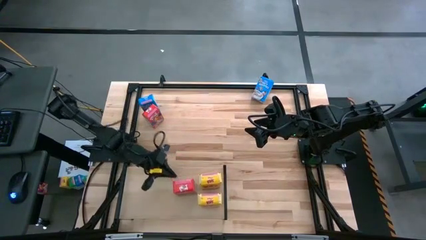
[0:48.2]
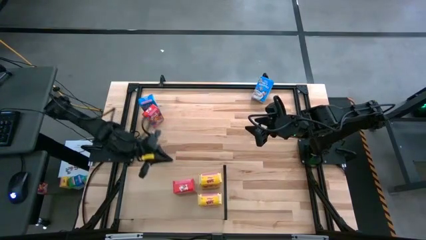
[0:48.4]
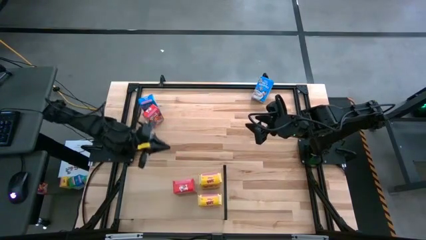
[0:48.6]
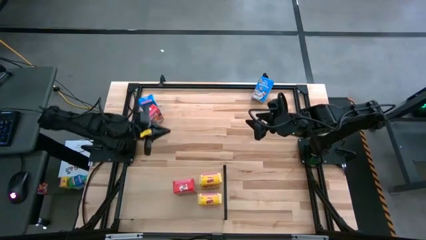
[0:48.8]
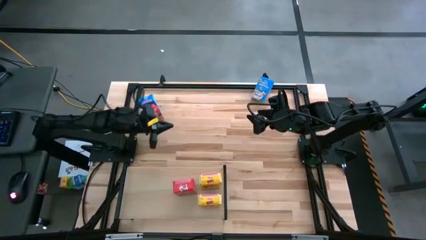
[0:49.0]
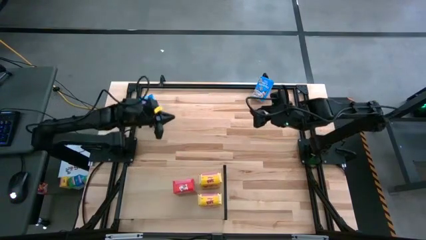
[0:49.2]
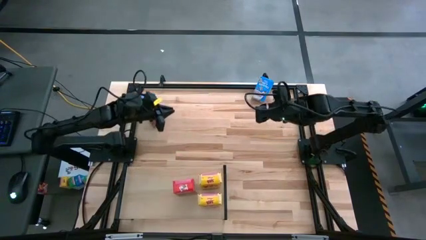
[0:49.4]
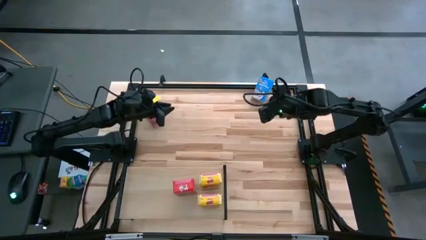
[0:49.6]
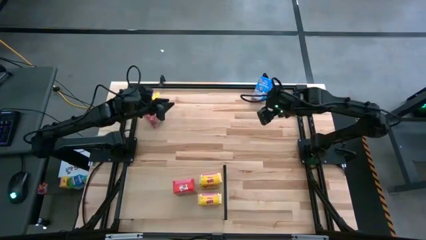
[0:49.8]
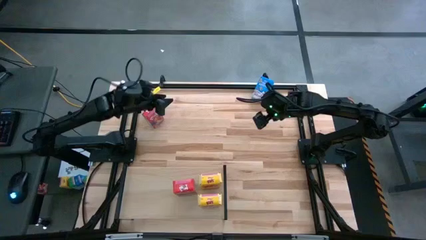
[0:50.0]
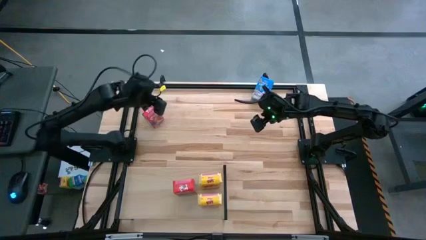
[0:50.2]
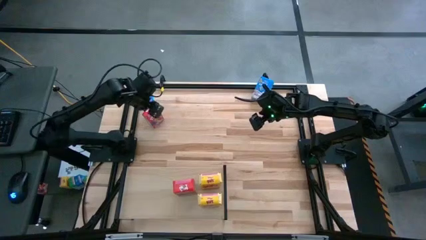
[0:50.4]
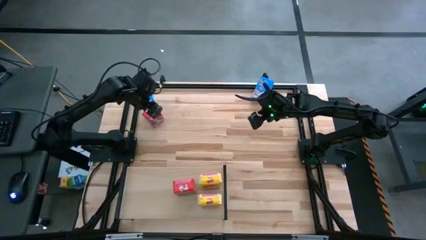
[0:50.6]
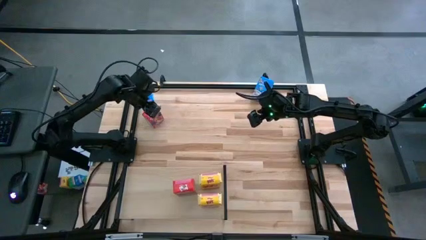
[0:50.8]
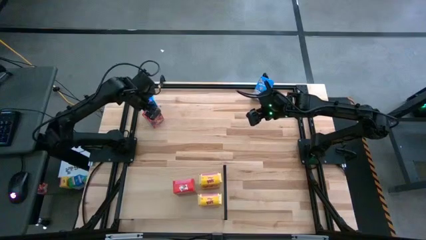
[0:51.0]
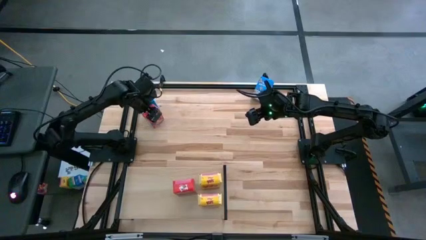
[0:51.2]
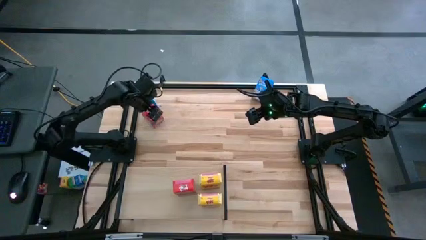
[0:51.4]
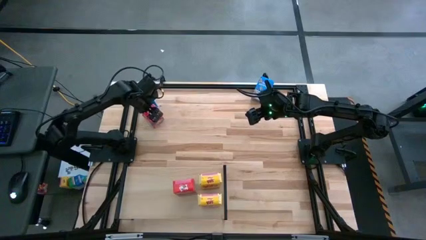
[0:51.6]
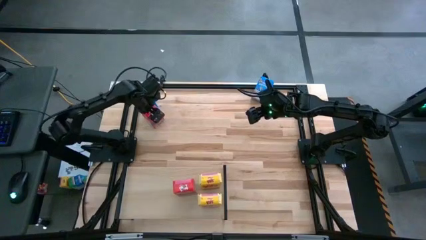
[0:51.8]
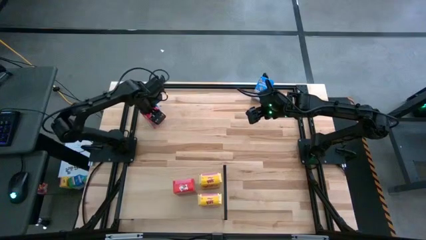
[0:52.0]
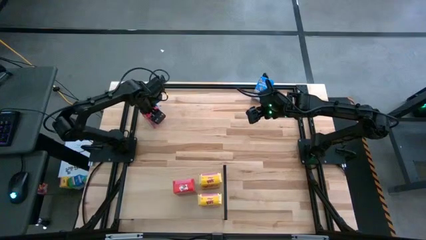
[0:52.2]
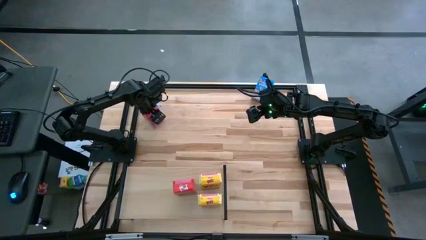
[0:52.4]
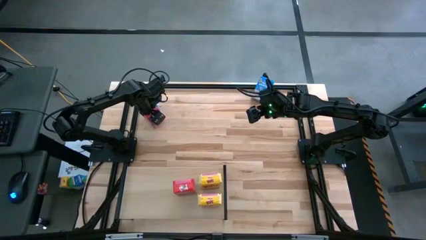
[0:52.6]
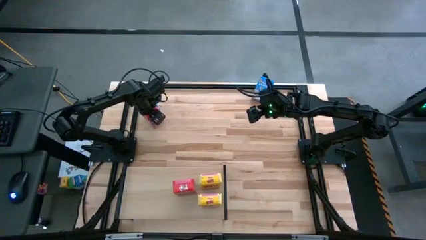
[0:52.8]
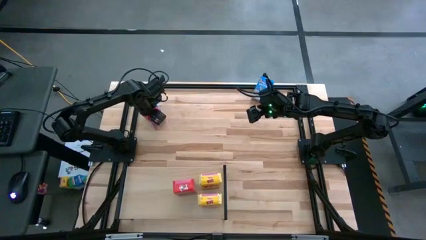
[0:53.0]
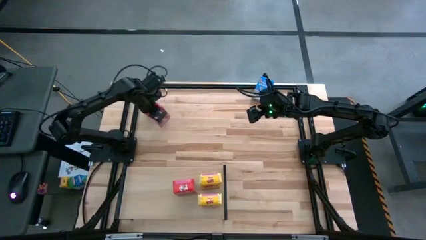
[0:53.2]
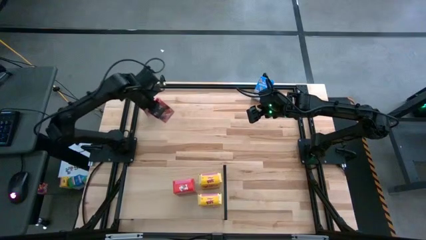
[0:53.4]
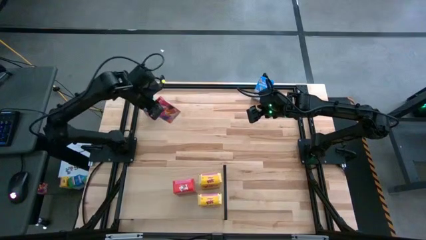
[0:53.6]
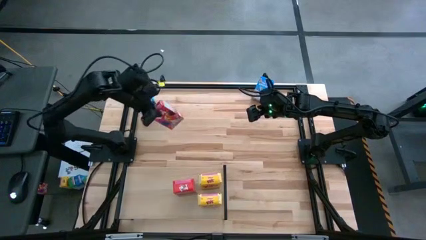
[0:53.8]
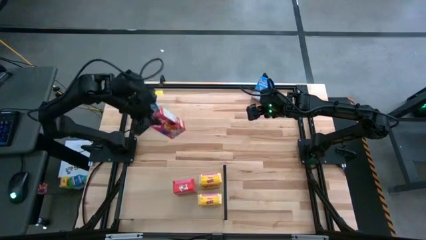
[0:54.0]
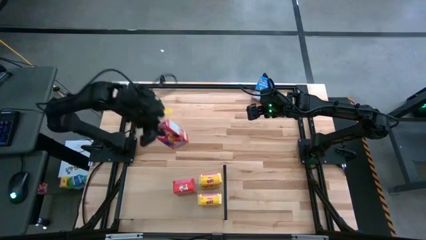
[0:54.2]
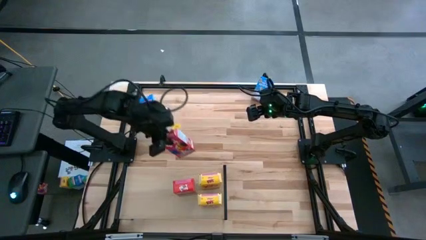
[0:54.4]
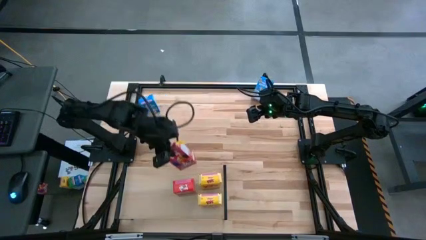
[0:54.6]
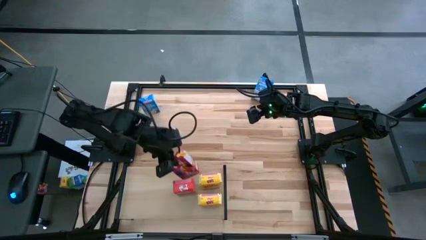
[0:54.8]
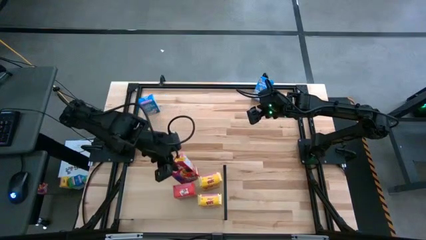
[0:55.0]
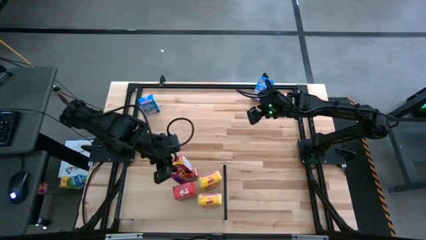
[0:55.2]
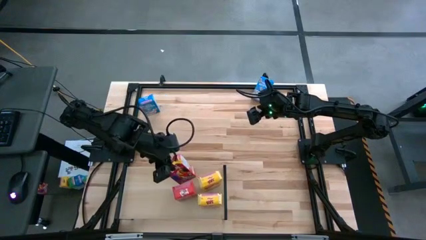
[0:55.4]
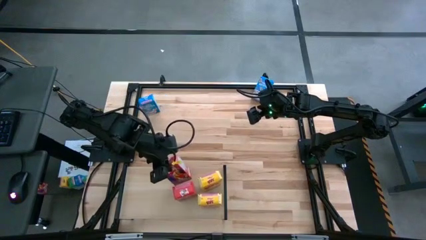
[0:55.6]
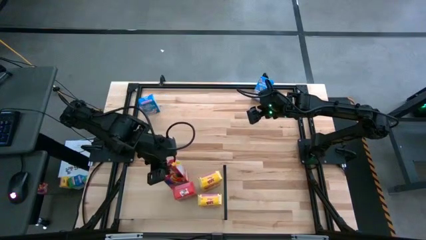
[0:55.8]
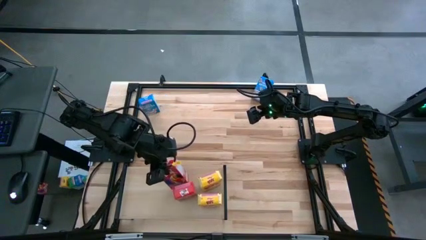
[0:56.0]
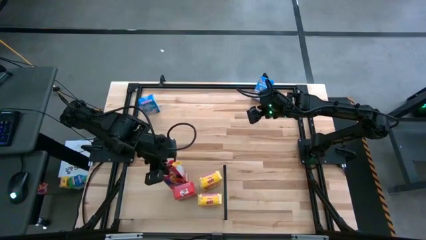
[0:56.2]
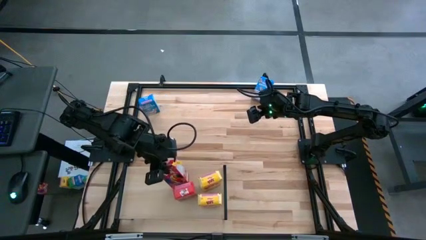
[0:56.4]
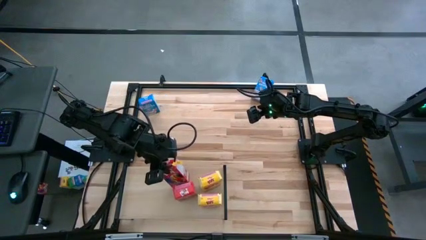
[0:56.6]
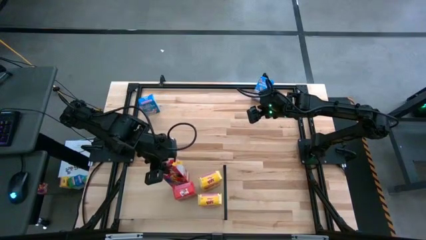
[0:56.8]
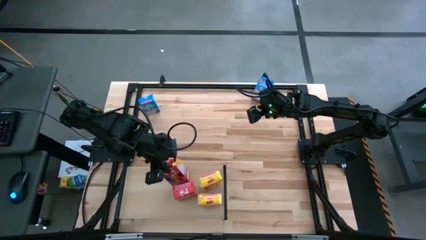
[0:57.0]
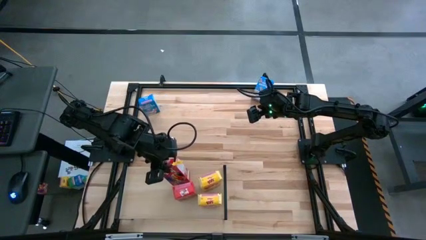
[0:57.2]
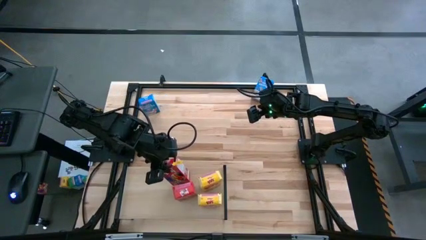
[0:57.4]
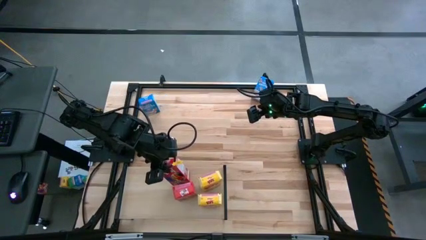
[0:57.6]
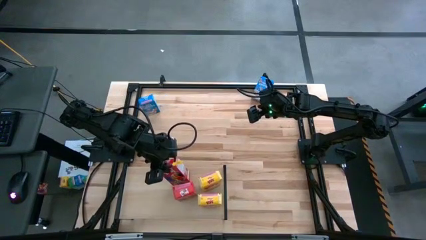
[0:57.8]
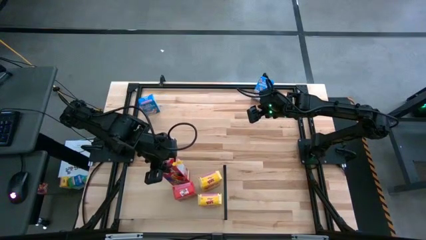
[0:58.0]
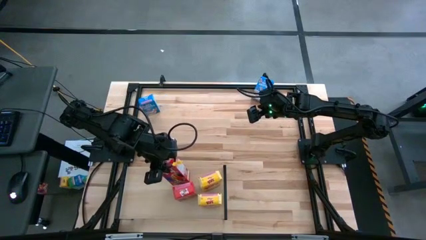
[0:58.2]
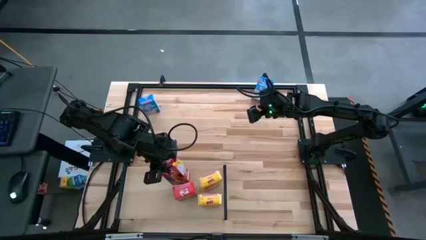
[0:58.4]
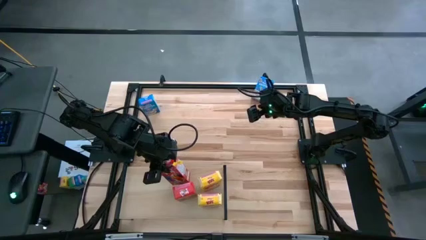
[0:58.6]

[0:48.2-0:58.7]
Task: Stack cereal on shelf
Put the red cereal box on the shelf aligned with the red cereal box

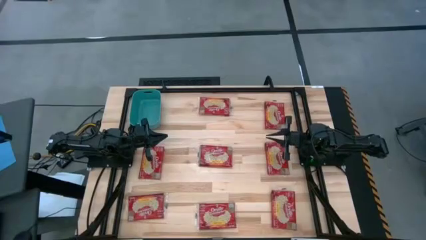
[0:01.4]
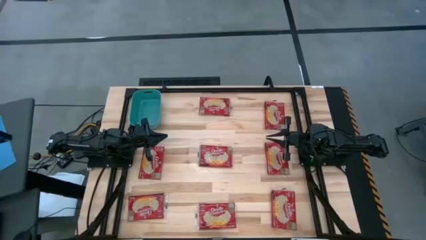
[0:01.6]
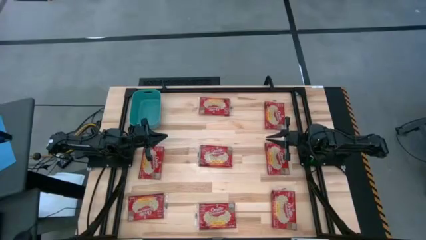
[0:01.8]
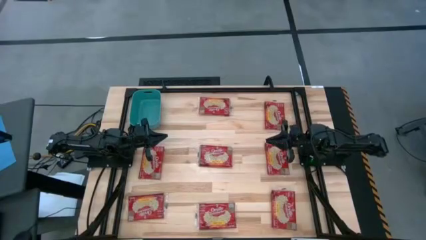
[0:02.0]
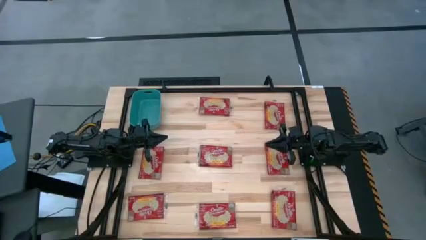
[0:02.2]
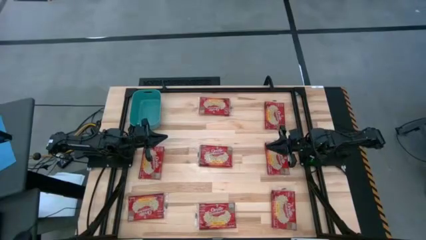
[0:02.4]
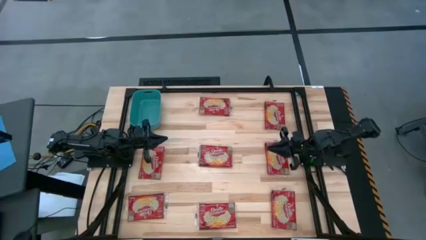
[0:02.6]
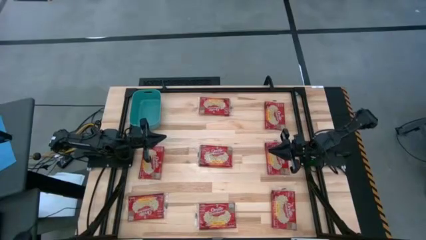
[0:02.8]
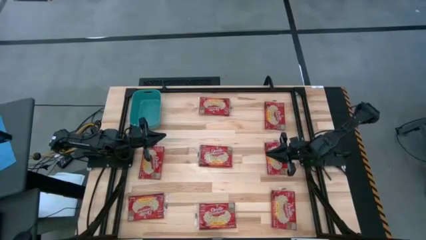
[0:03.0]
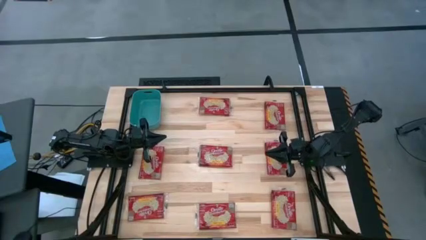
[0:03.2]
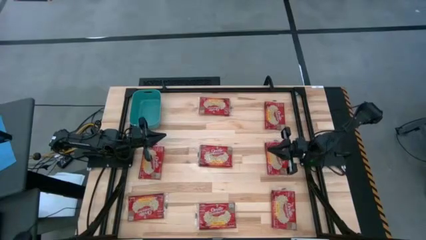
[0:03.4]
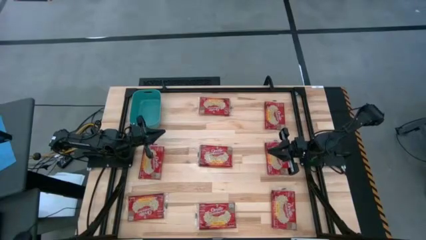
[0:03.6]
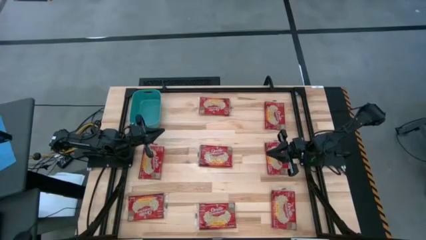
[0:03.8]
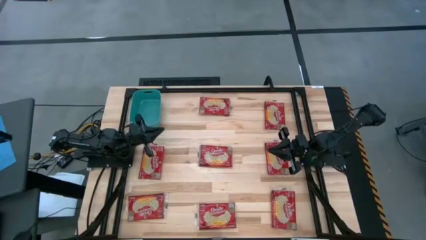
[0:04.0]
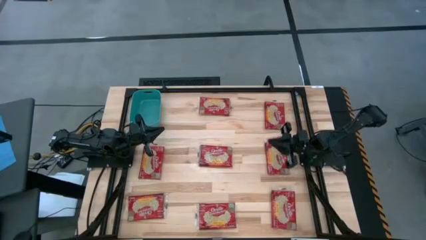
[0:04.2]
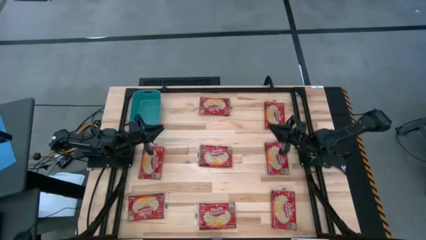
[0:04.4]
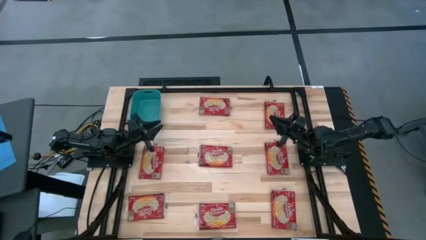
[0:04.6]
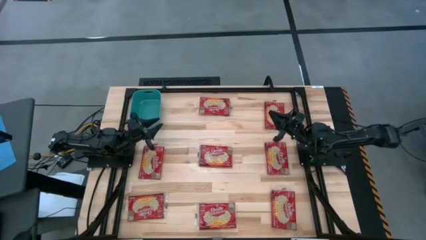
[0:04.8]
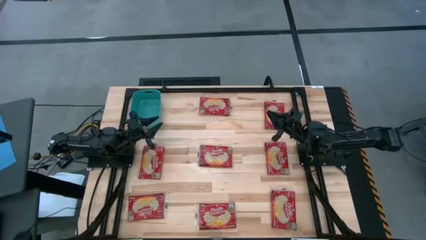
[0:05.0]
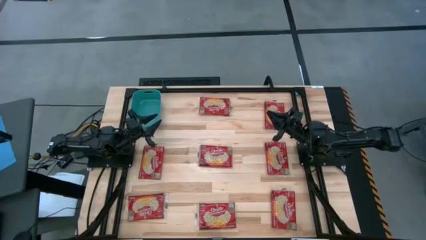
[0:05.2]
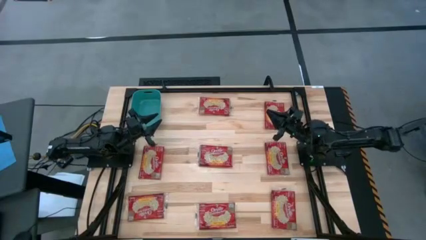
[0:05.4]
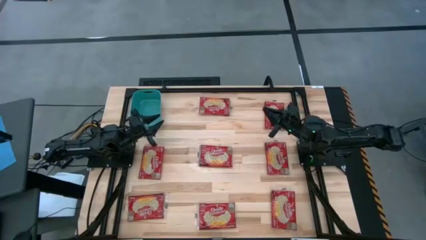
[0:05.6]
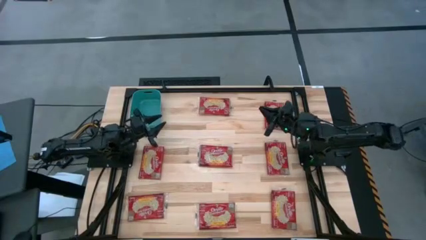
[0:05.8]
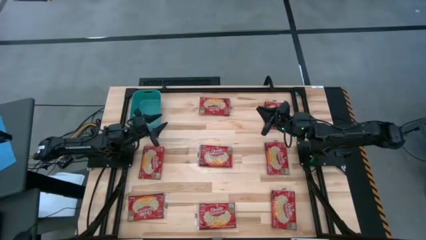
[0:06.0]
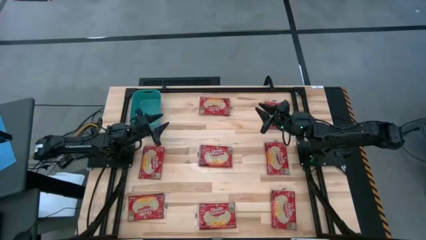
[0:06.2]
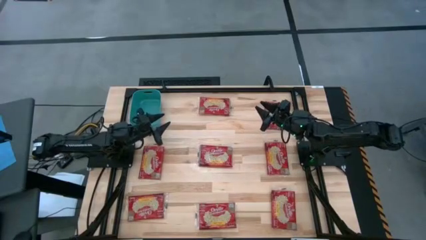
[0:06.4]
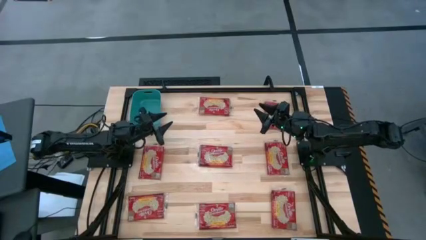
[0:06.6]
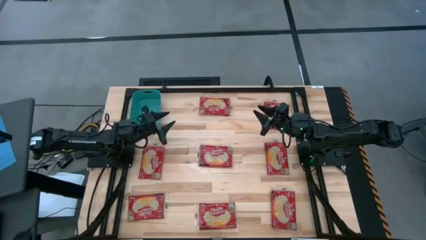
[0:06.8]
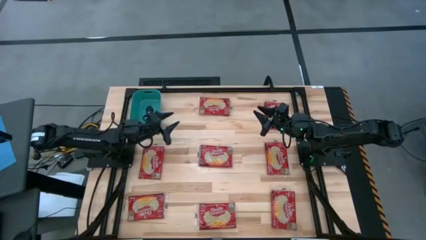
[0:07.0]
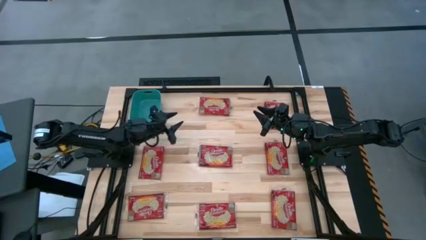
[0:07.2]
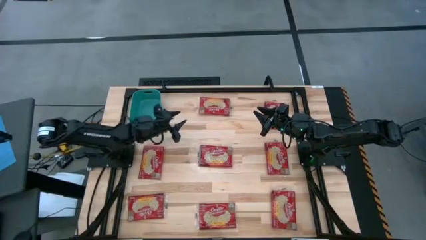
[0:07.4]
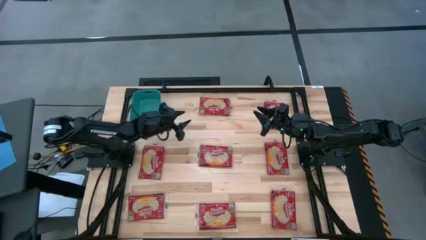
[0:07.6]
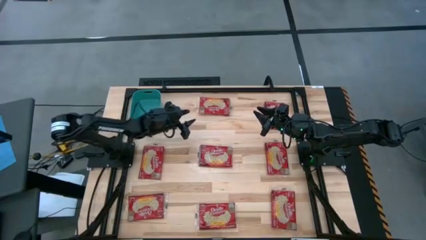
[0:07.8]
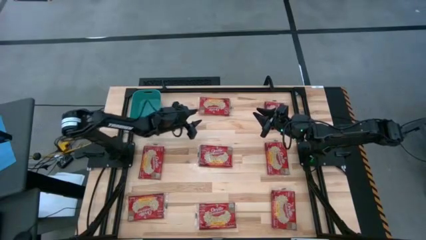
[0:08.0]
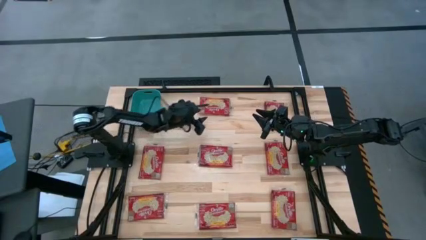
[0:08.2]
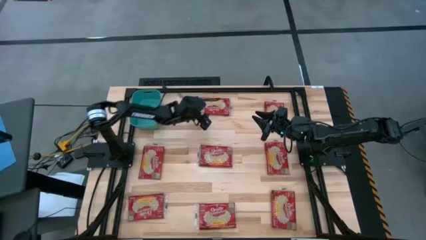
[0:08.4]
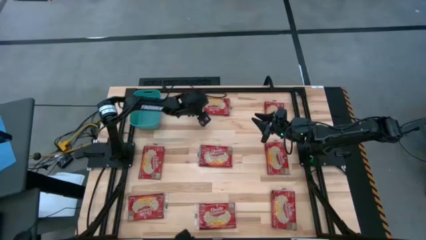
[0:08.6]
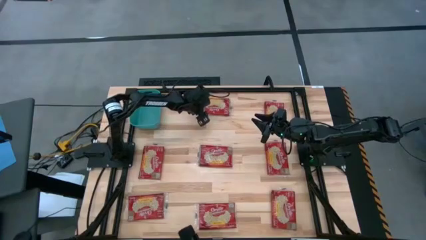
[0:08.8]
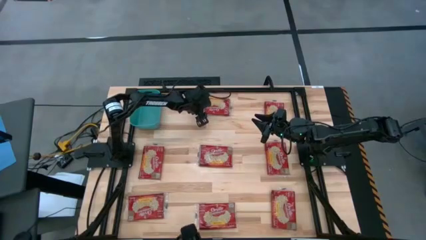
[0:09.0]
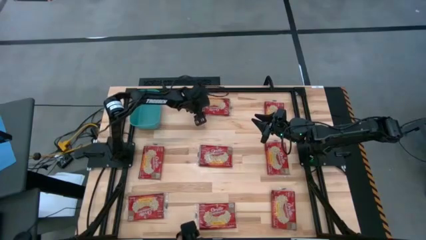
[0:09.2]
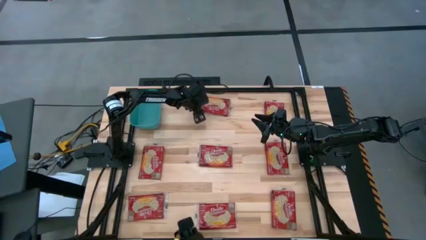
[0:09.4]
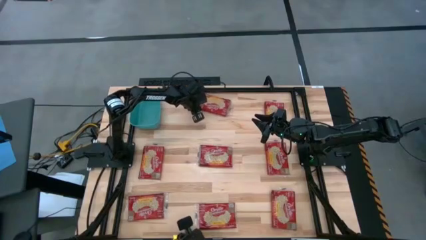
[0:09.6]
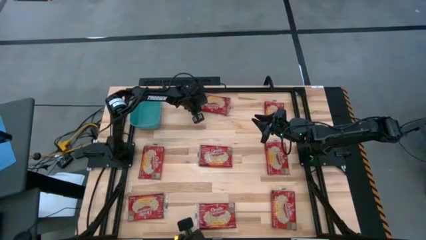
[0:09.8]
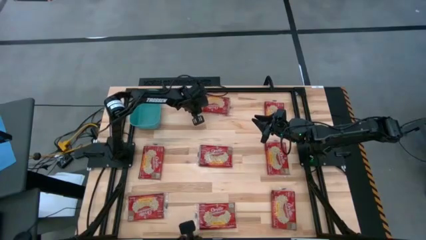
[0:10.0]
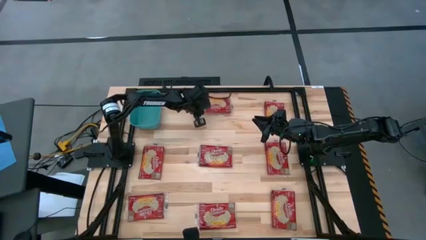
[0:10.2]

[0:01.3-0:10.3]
Task: Sort popcorn bags into baskets
Put the red popcorn bag in the blue bin
